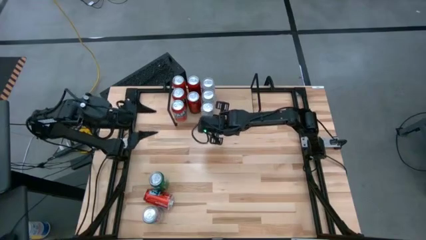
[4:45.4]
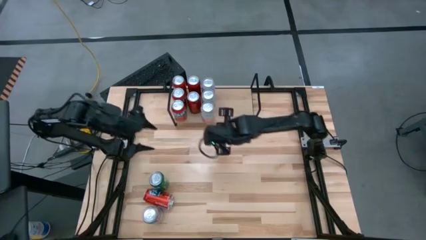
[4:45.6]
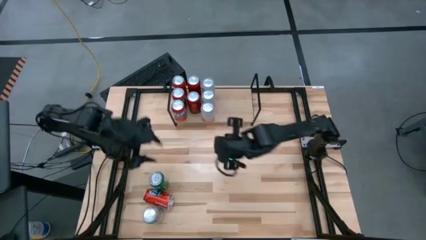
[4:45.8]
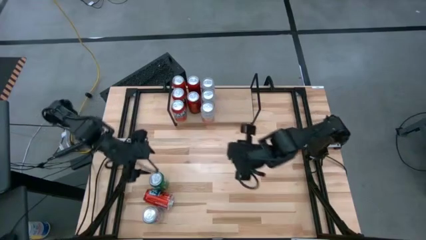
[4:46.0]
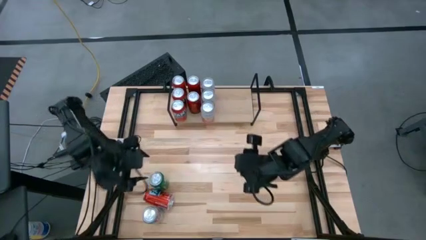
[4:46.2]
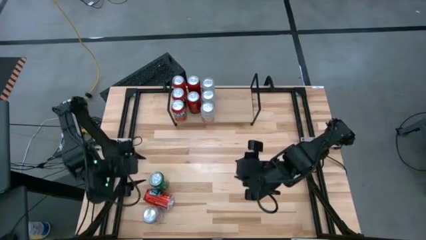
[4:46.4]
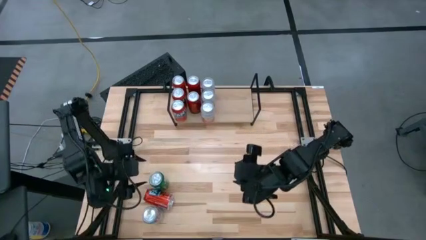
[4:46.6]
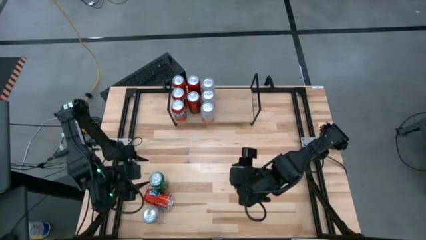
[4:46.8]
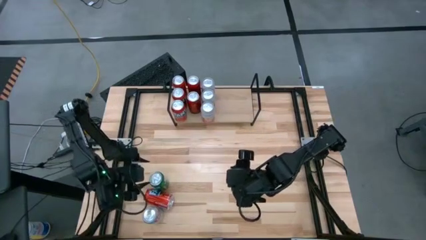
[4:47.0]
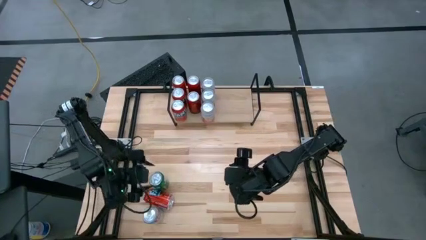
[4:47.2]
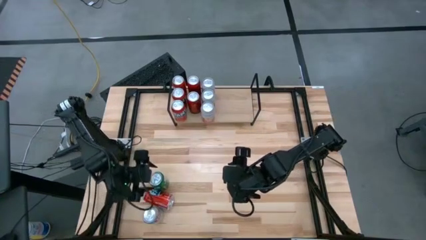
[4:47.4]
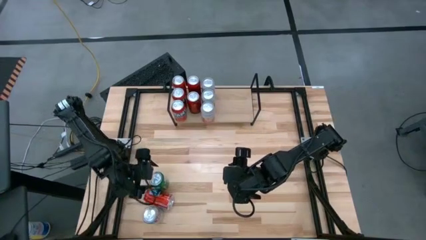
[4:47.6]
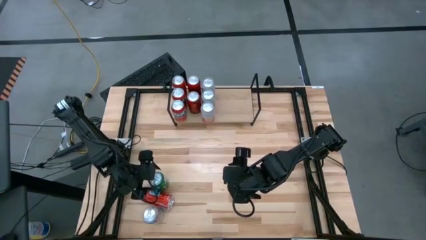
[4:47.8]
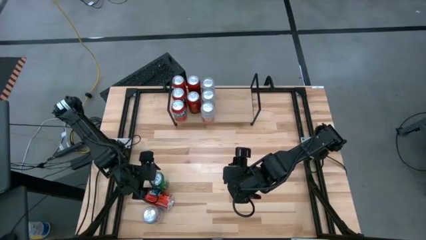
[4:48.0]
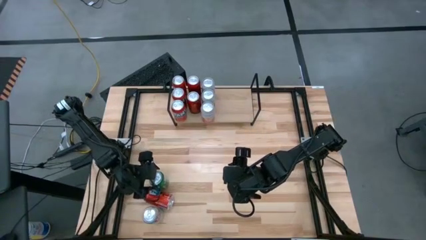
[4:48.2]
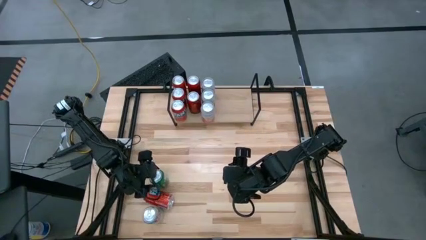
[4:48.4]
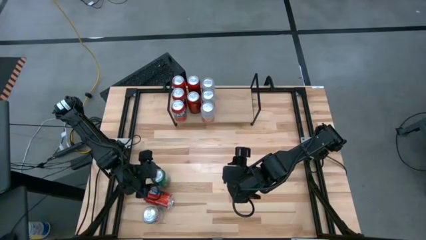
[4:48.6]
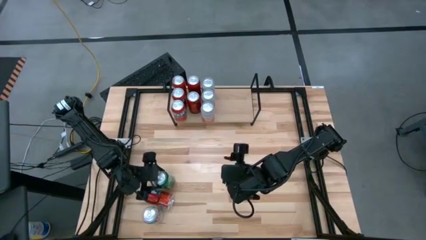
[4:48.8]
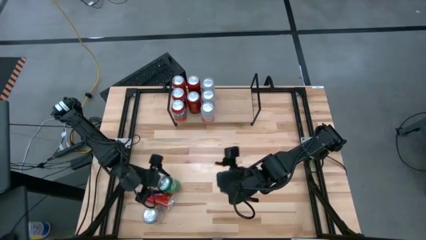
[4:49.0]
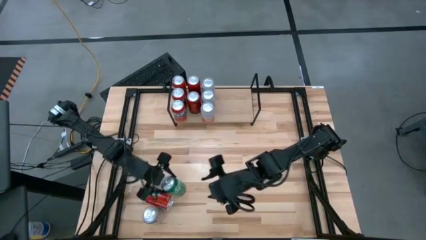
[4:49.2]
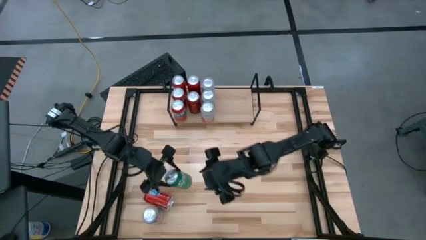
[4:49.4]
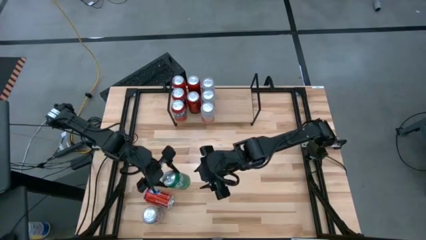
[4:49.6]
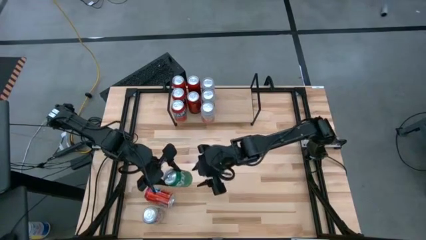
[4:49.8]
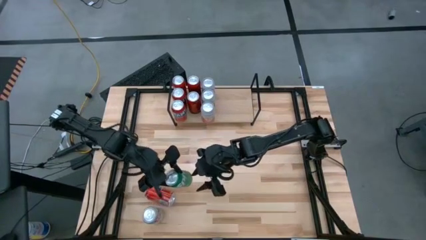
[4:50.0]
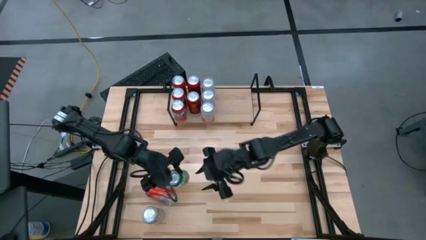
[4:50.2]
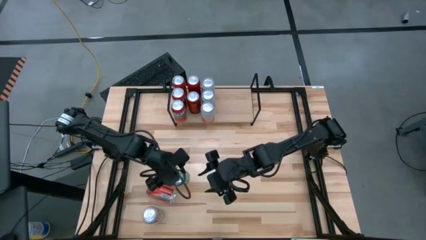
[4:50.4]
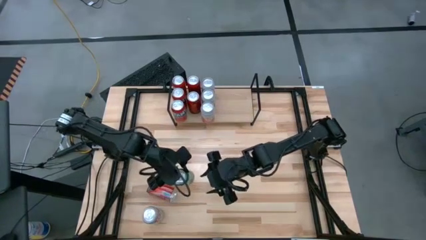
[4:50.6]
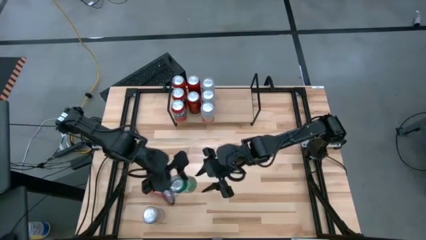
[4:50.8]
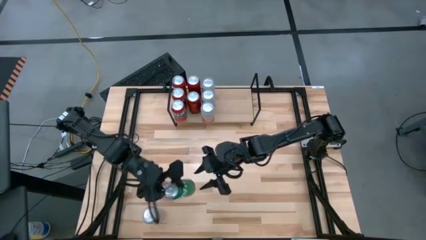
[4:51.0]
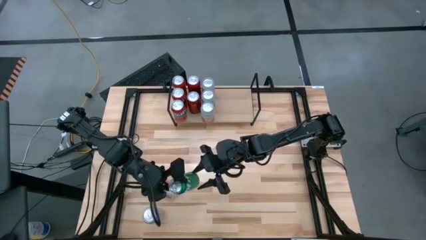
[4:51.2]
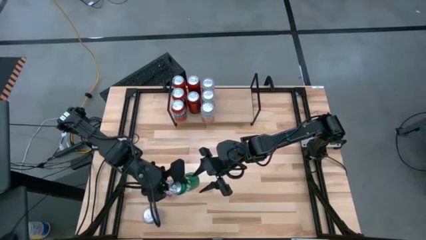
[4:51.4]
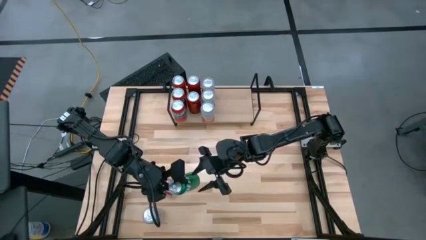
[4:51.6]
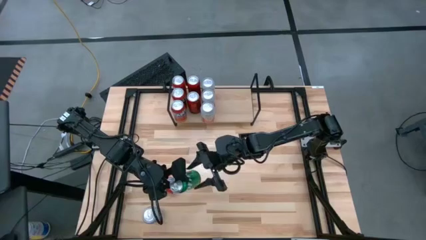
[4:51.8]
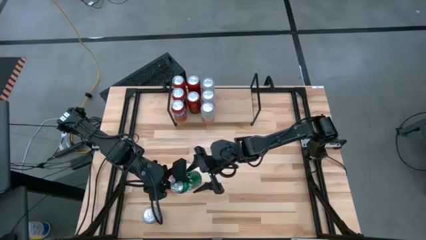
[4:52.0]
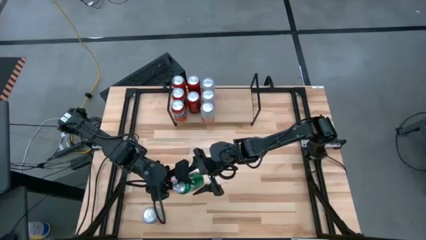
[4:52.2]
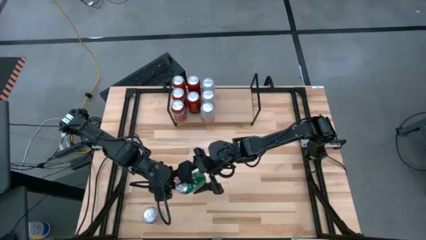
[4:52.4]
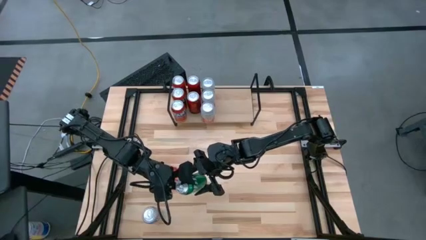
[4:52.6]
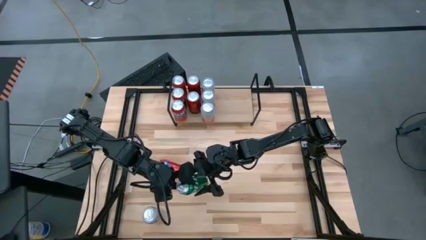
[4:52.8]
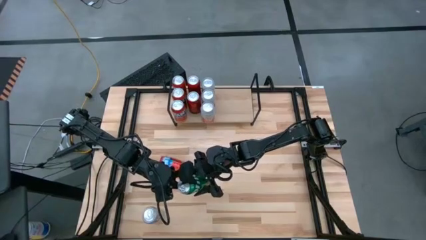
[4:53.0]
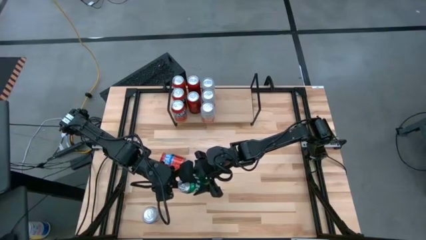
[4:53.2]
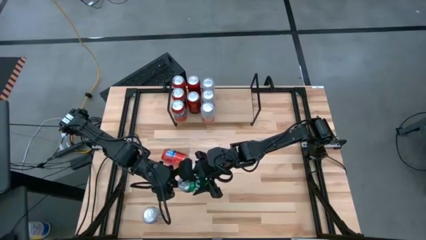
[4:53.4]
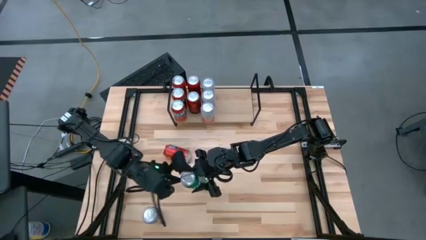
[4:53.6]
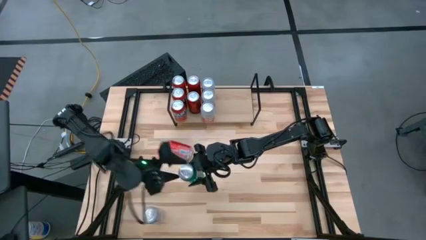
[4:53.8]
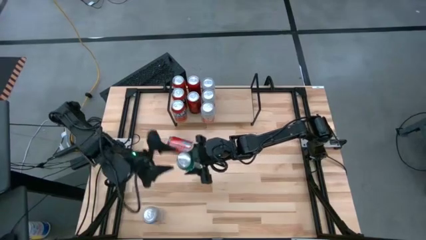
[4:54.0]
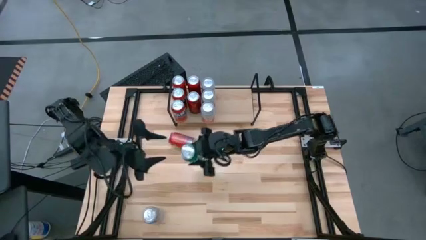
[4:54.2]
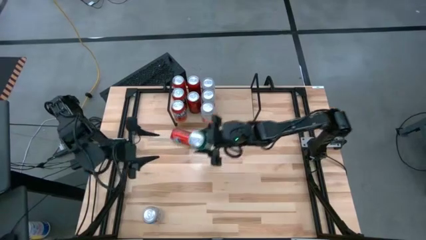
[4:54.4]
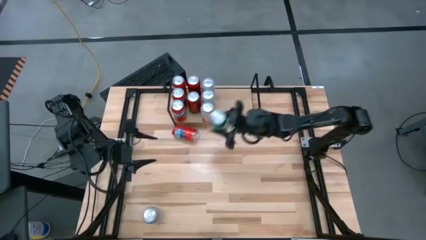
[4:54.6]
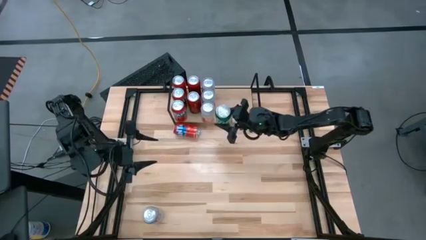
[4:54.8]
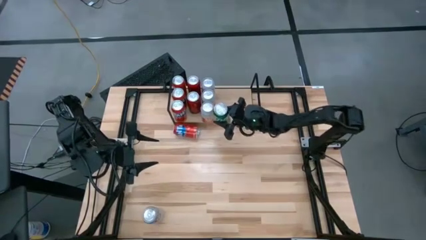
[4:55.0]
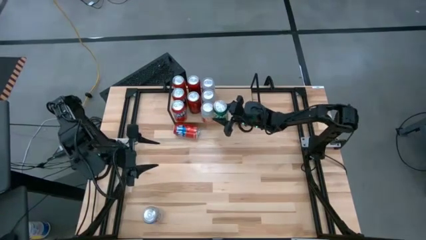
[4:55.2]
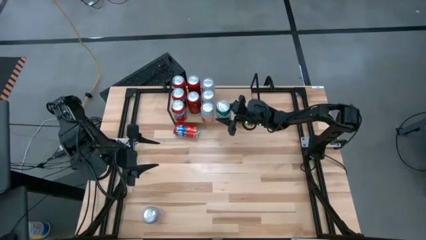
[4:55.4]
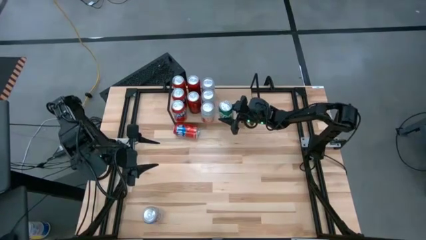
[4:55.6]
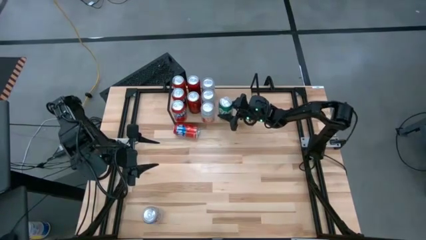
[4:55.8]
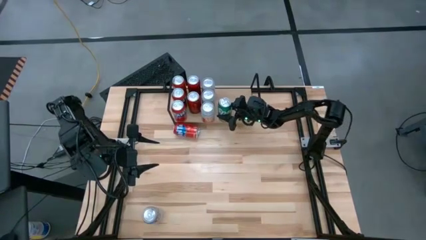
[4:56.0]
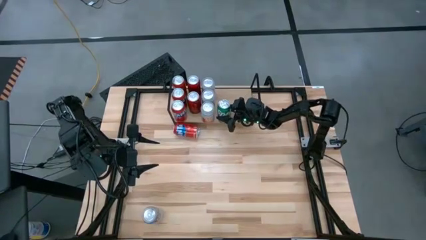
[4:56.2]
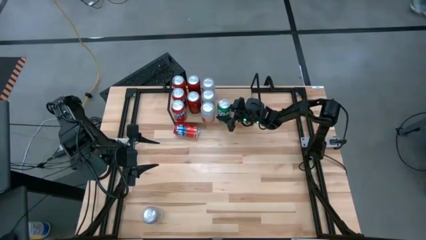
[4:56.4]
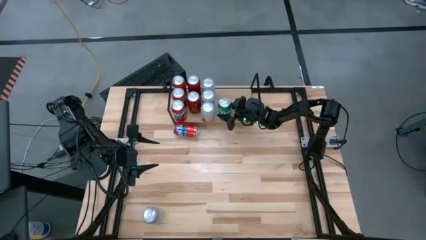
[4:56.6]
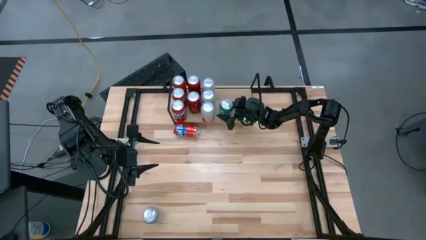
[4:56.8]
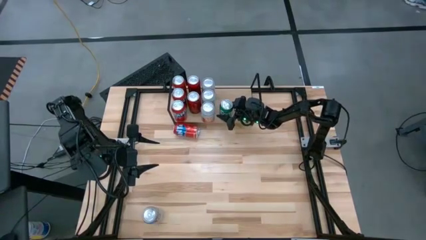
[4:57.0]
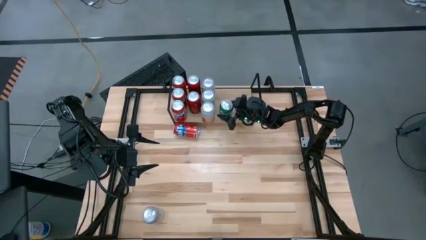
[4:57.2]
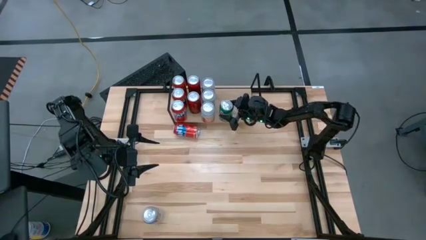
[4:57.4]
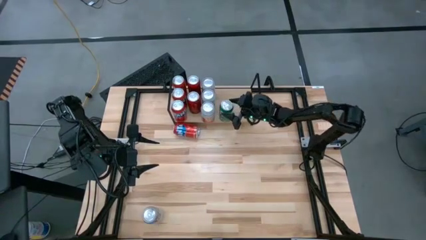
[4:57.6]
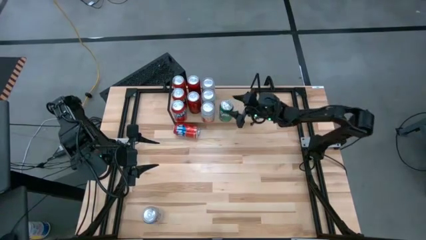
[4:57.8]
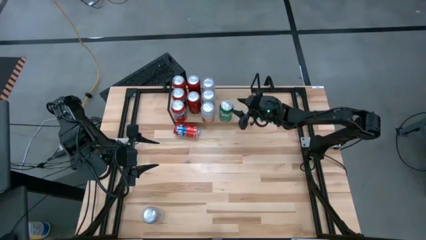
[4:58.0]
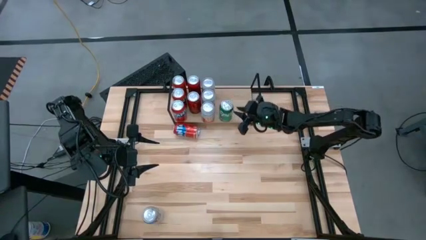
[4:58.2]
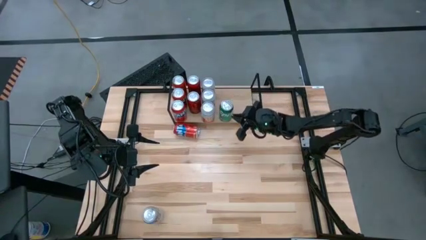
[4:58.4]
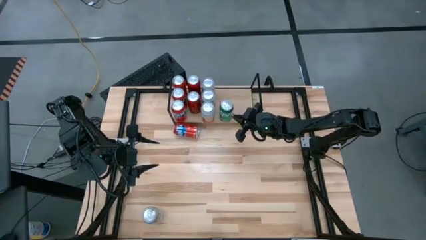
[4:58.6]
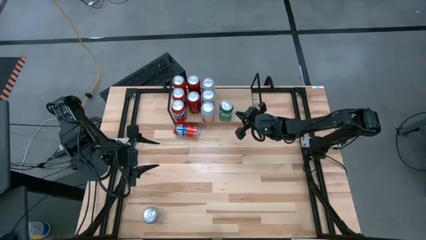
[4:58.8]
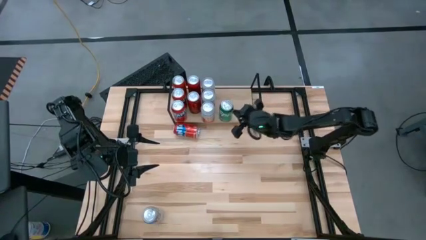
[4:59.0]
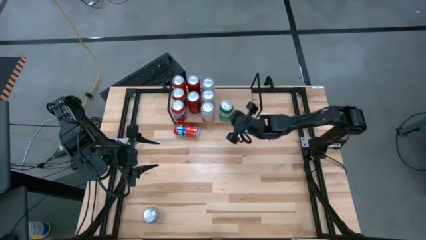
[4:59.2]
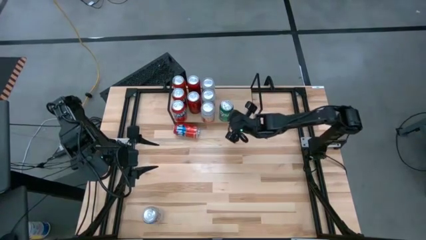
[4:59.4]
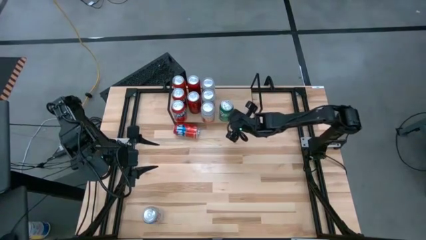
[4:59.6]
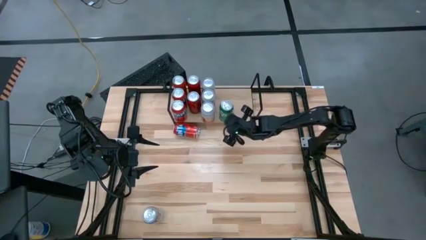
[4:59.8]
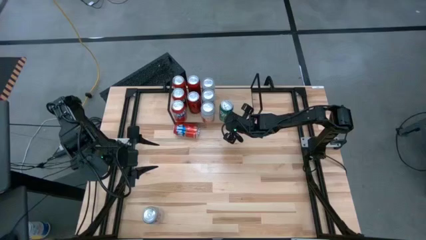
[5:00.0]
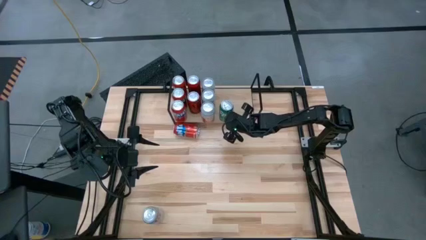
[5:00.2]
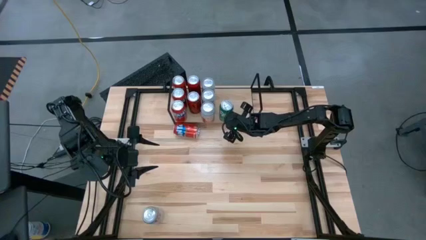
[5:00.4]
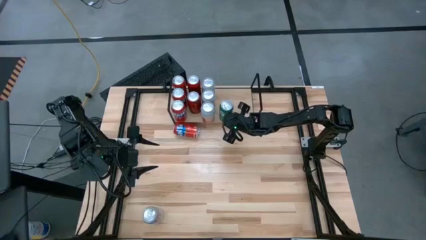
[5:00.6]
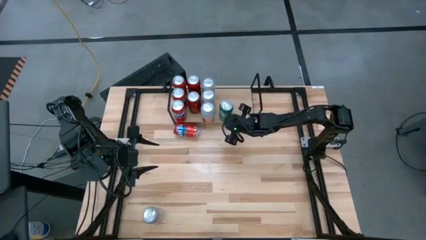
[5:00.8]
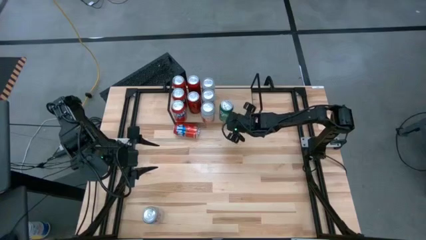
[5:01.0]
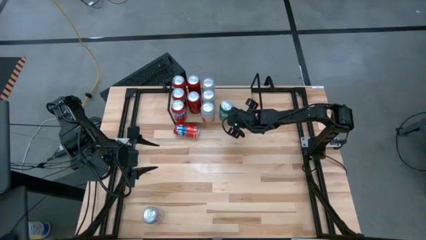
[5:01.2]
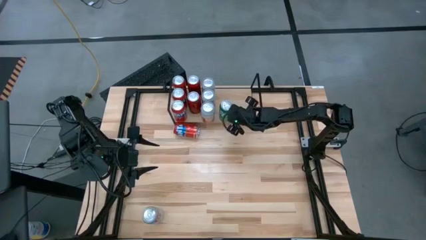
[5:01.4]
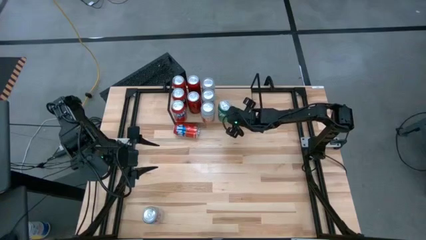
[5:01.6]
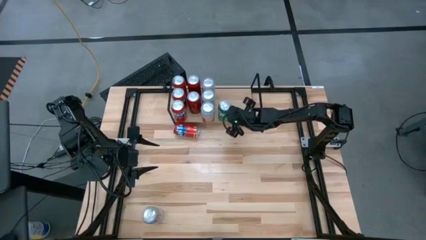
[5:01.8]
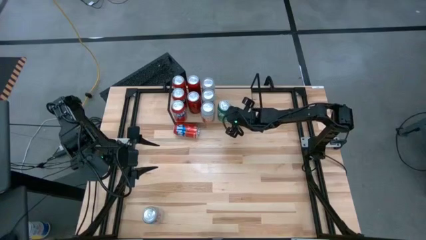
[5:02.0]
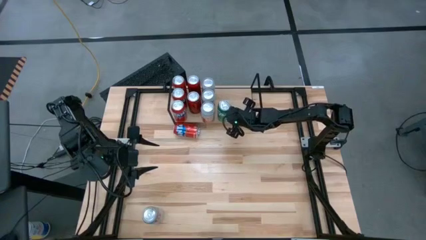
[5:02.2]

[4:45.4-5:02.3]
Task: Place canned beverage on shelf
Put the green soda can on the shelf
